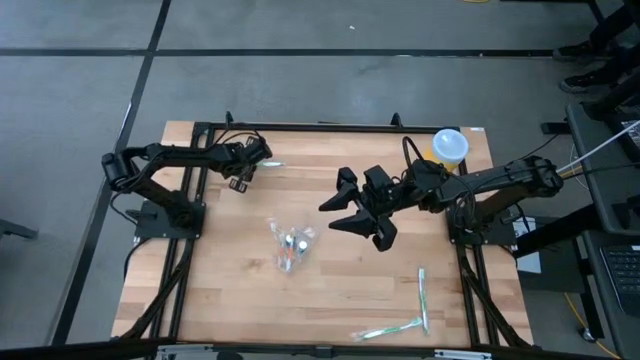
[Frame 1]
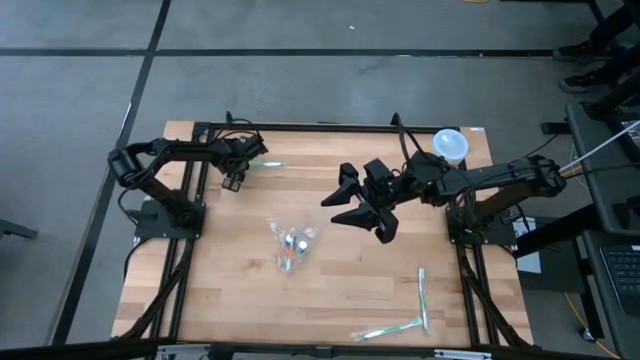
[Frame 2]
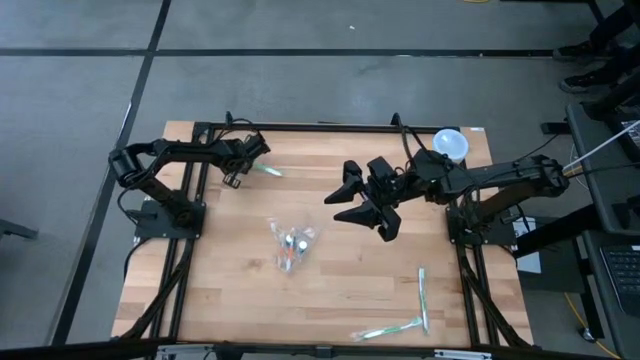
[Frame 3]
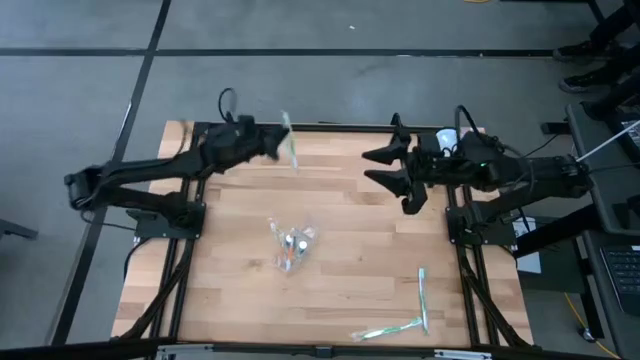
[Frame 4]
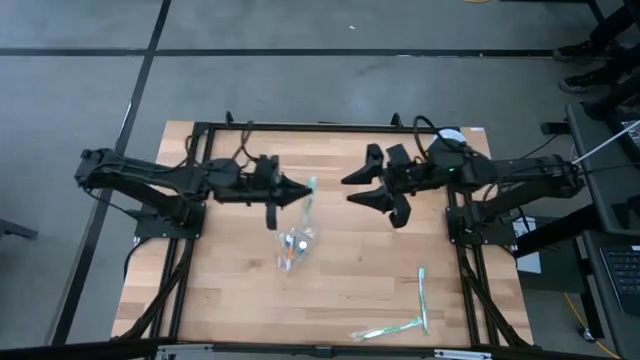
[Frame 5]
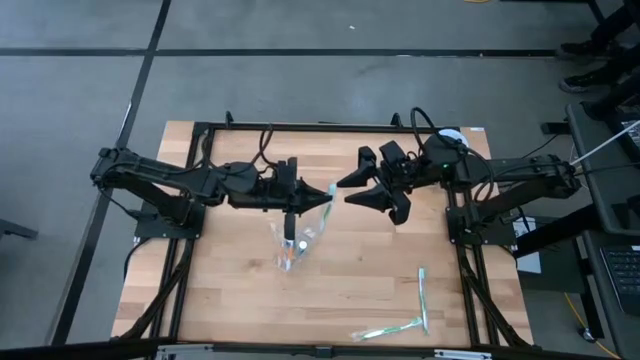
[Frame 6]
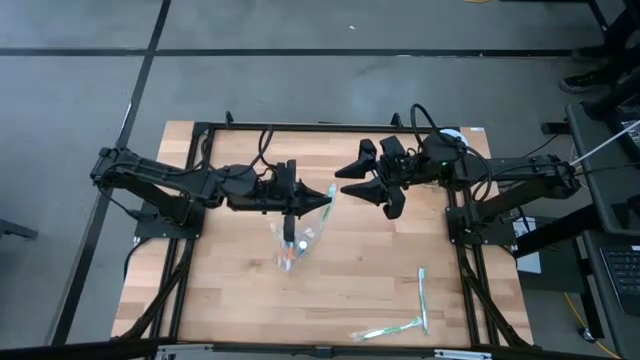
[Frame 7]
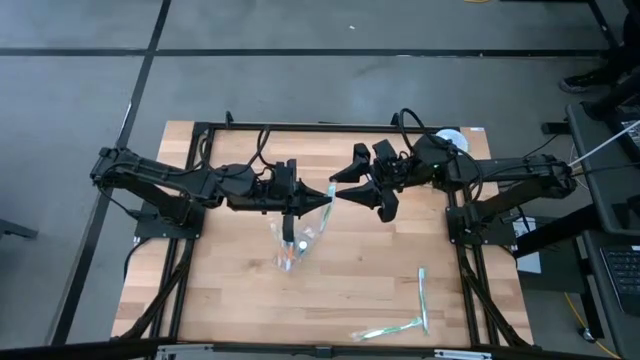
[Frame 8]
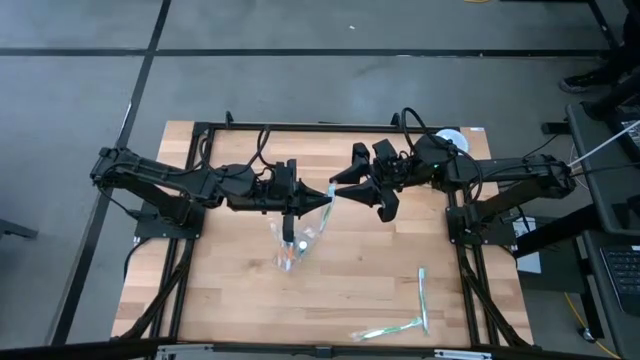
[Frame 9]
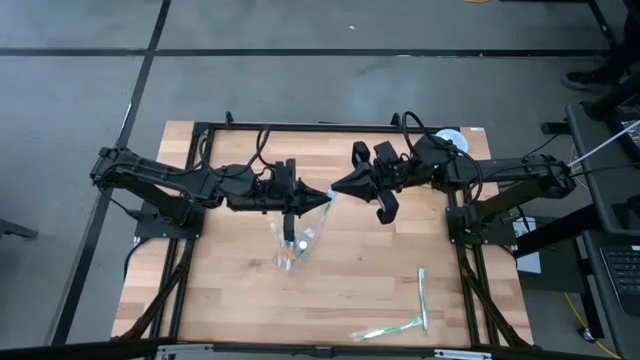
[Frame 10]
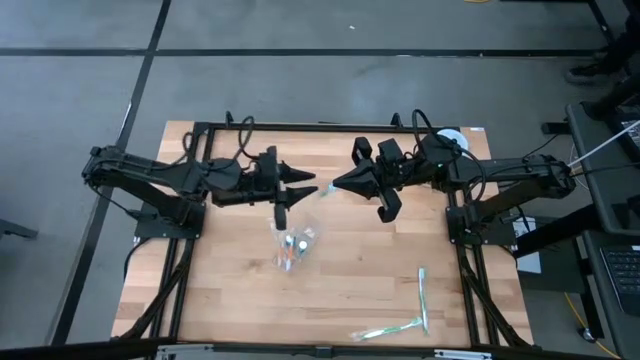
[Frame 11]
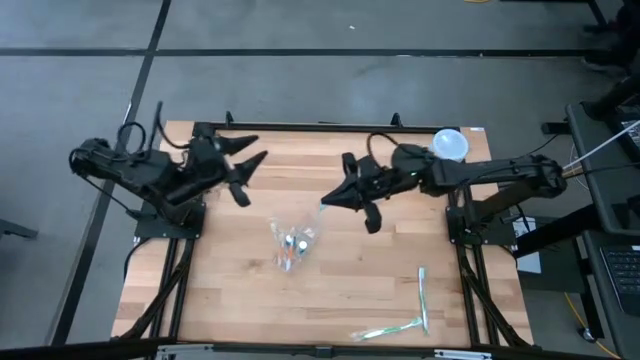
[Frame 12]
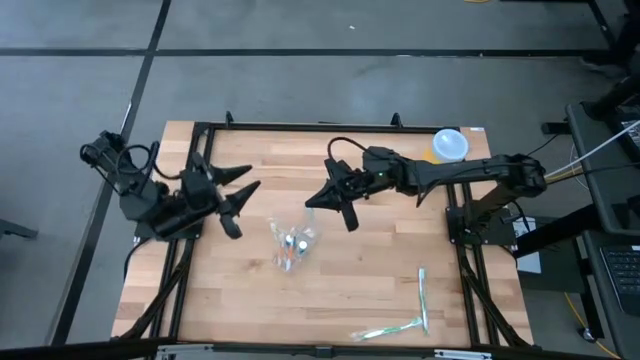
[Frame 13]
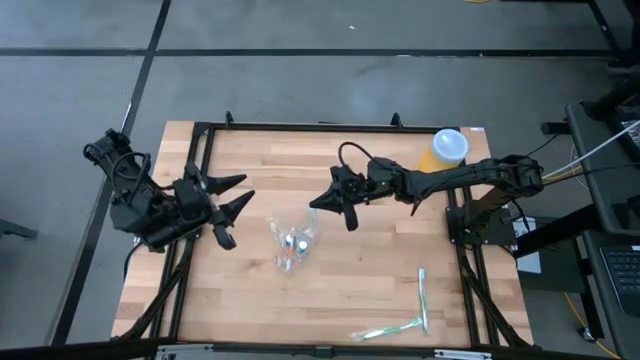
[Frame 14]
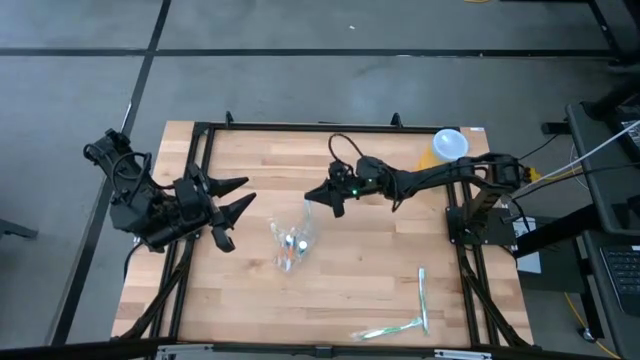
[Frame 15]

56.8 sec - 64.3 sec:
Task: Pick & Place toothbrushing station
Put the top left green toothbrush into the transparent organizer

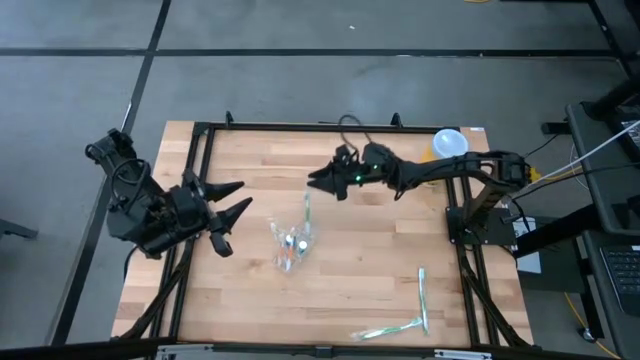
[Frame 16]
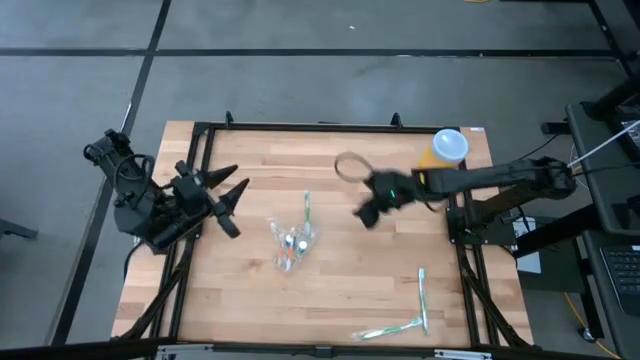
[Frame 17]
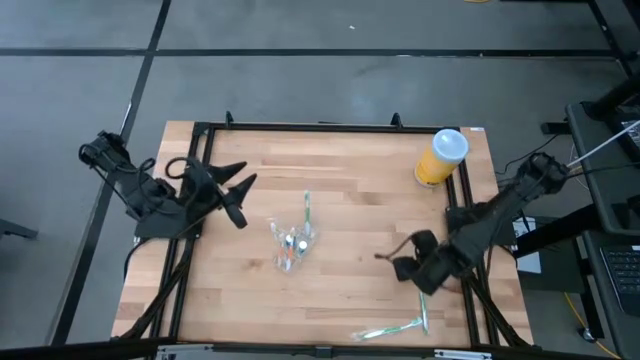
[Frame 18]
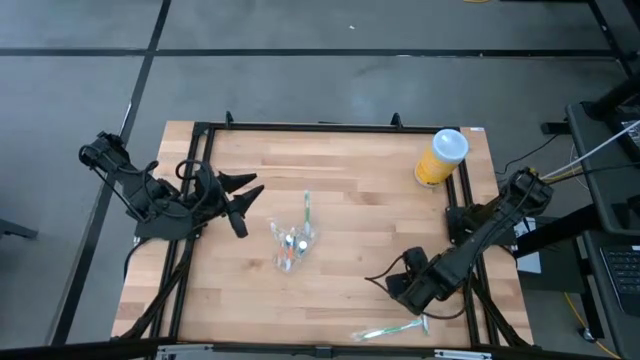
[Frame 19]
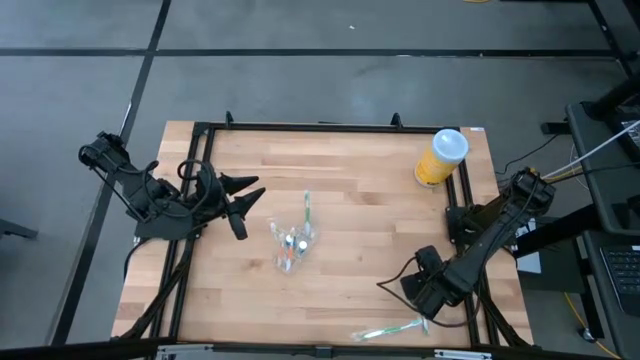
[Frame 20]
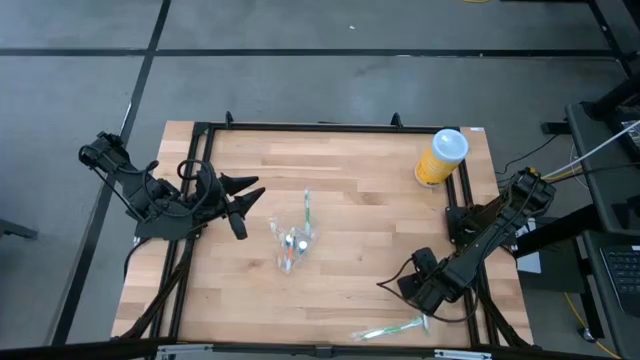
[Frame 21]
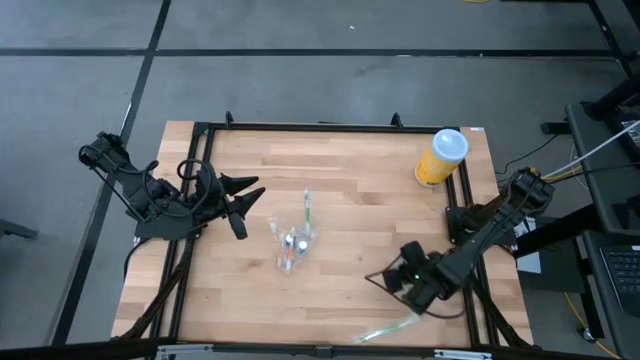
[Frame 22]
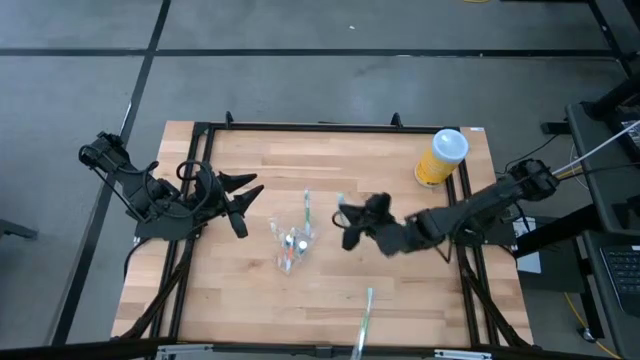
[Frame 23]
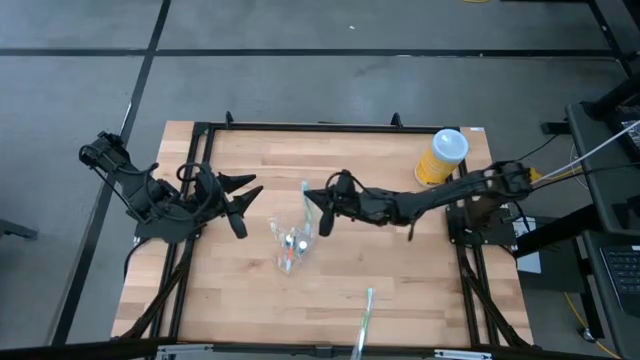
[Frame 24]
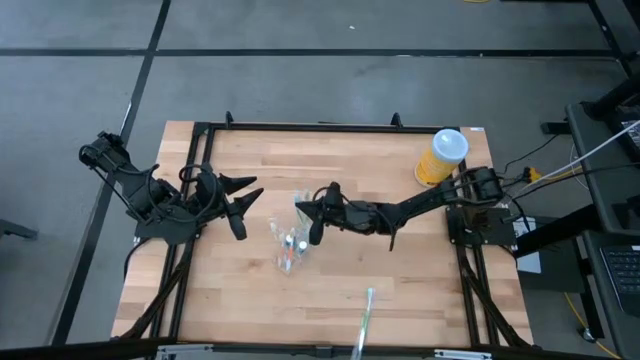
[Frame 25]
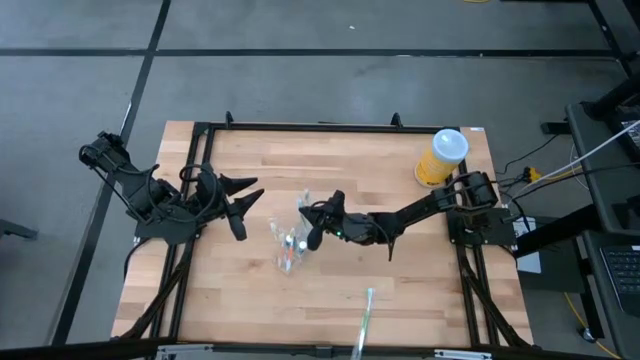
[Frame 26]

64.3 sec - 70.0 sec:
Put the top green toothbrush into the transparent organizer

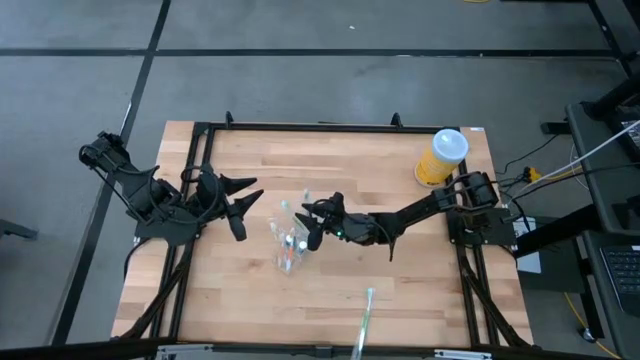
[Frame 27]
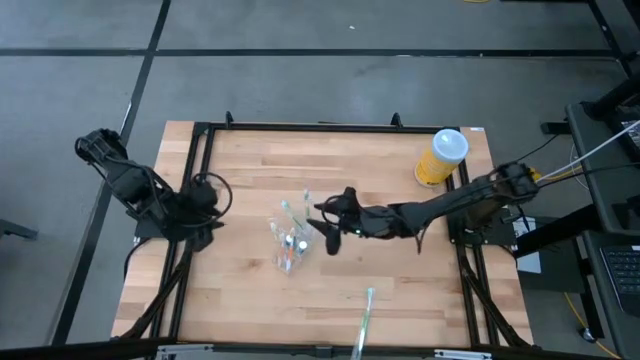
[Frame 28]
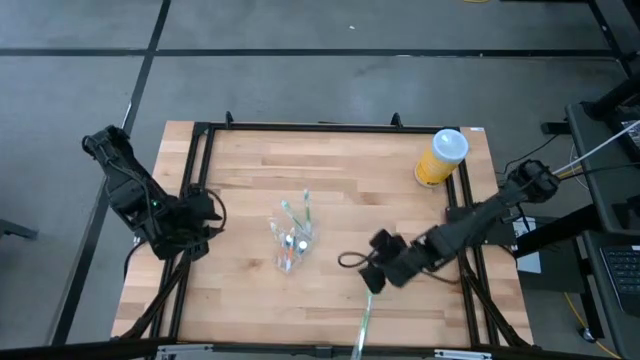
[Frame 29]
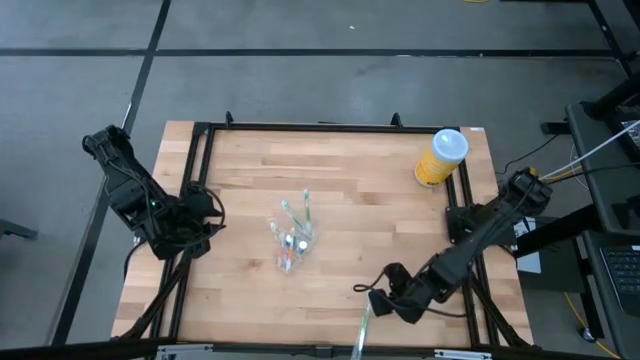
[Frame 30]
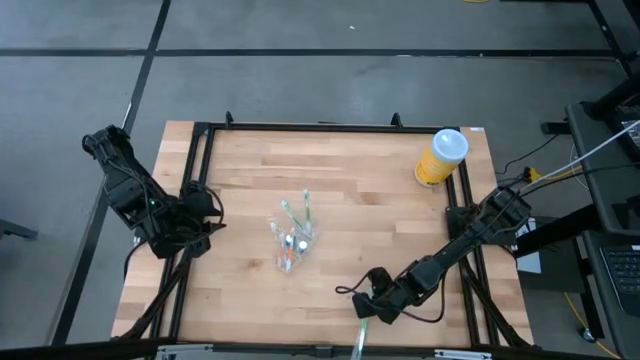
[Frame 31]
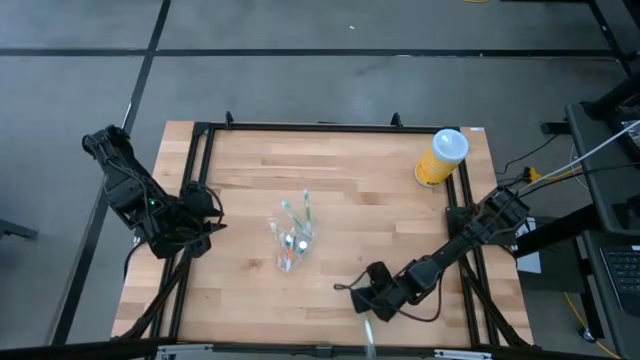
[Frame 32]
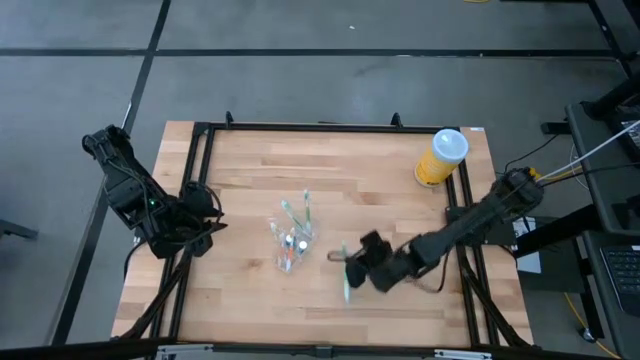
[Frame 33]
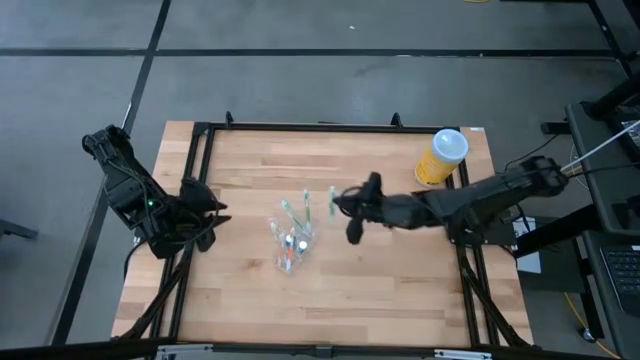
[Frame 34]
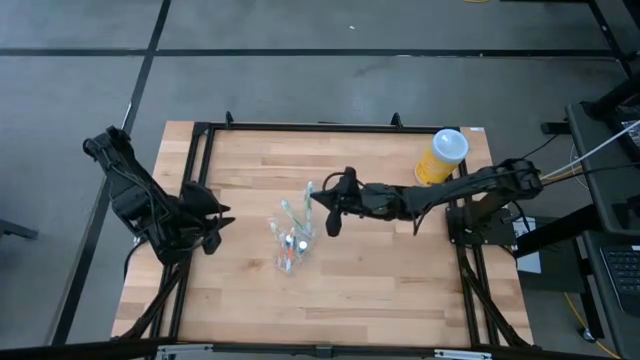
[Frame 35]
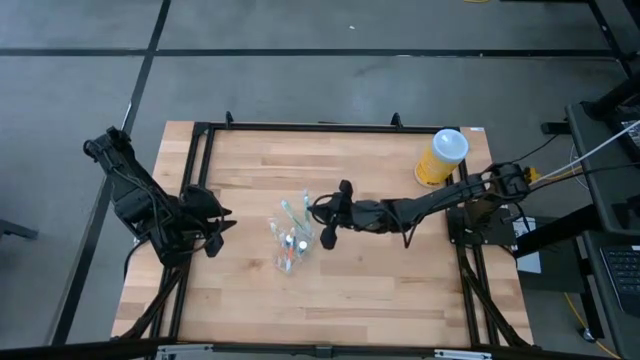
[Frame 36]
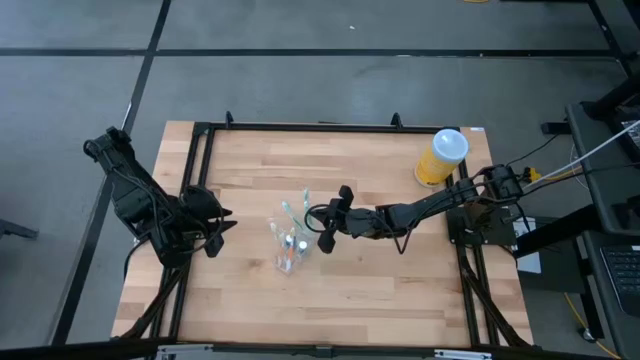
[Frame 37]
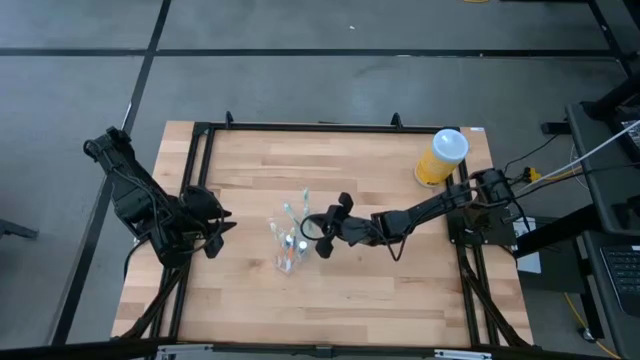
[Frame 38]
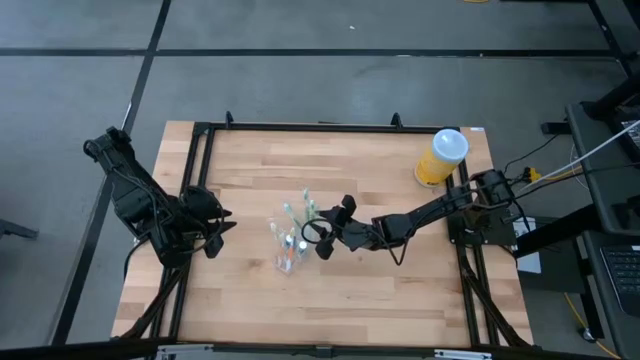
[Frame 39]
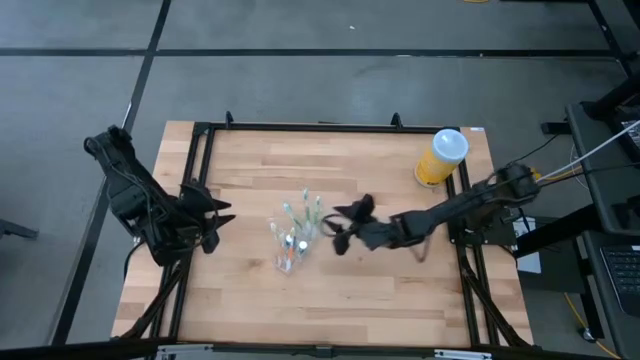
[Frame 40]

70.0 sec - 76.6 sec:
Put the green toothbrush into the transparent organizer

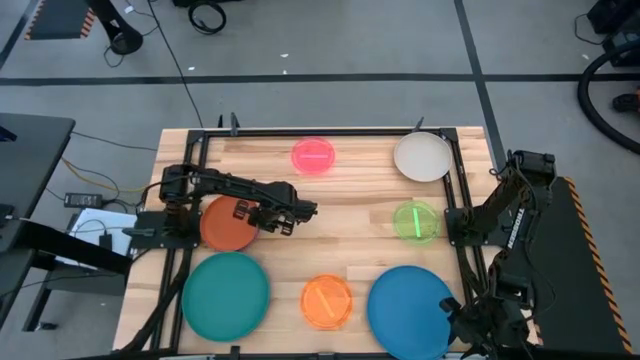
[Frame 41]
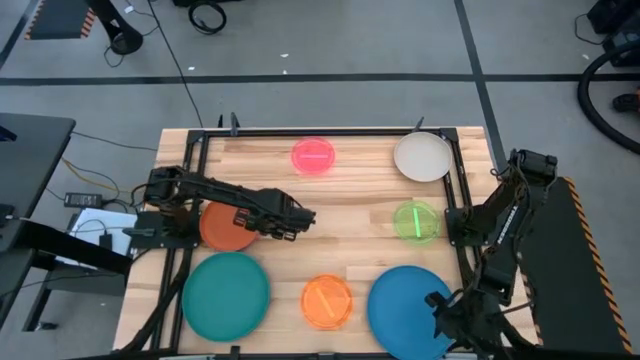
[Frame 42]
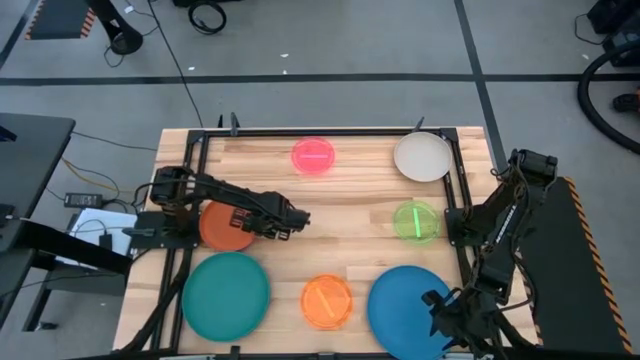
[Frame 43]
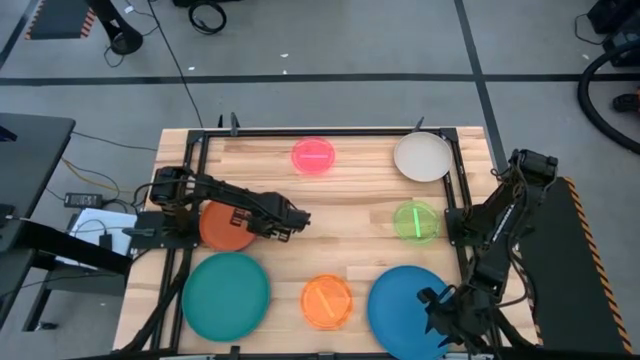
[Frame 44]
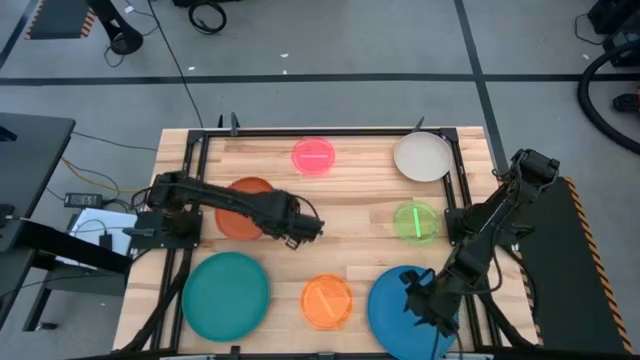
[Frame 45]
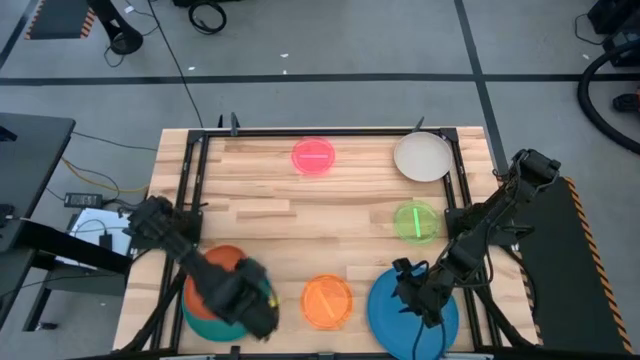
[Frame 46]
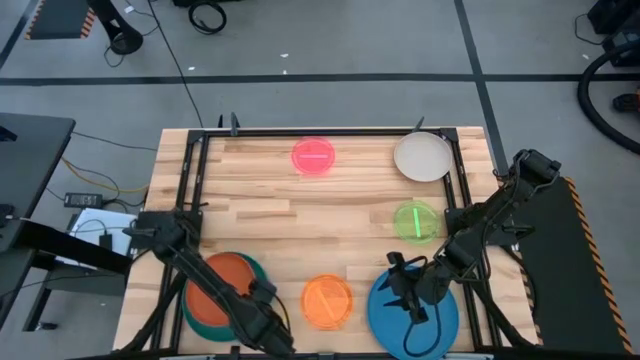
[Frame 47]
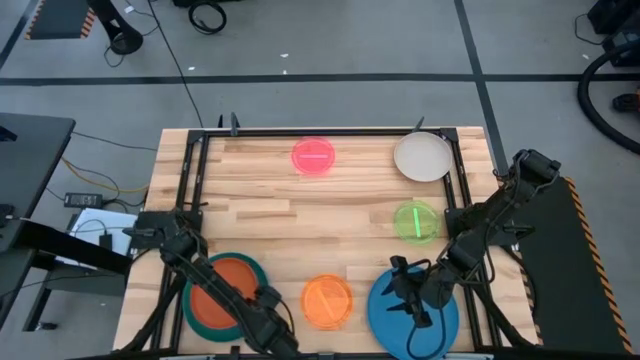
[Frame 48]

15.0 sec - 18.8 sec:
Task: Stack plastic plates
Stack the stacked plates on top of the dark blue plate
